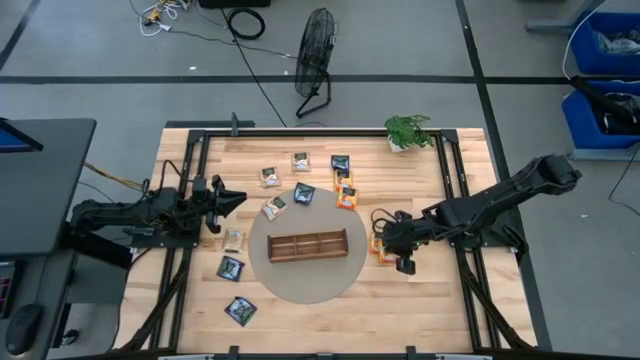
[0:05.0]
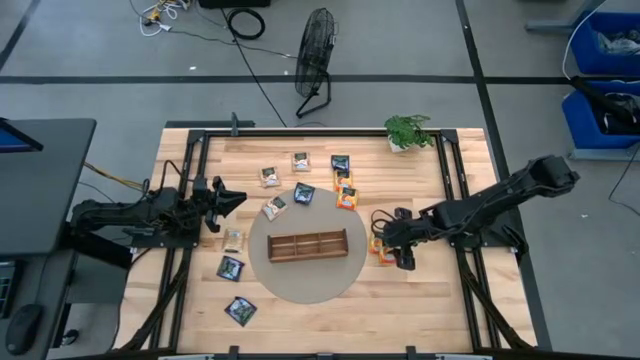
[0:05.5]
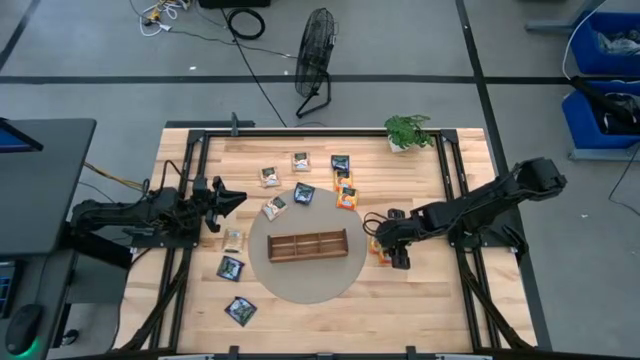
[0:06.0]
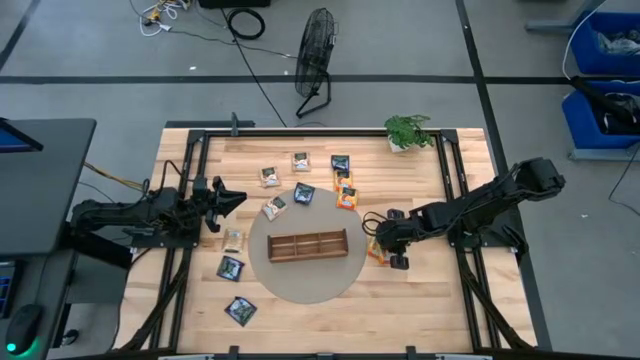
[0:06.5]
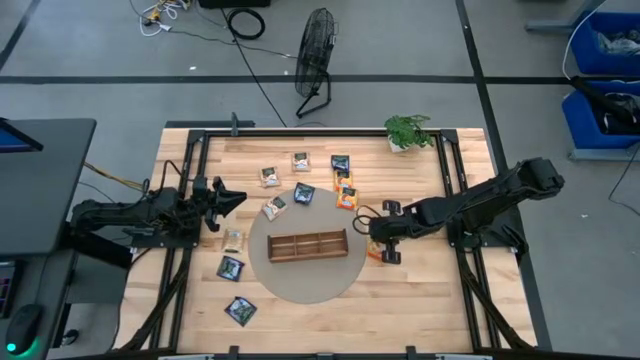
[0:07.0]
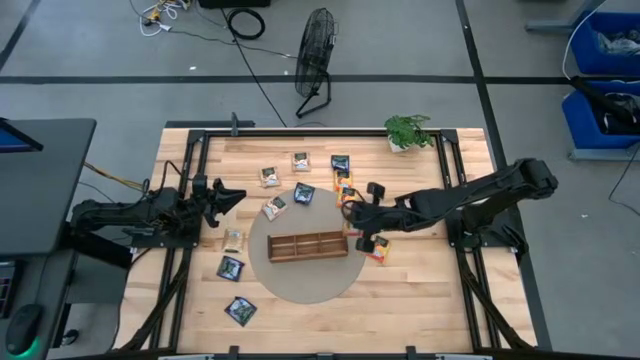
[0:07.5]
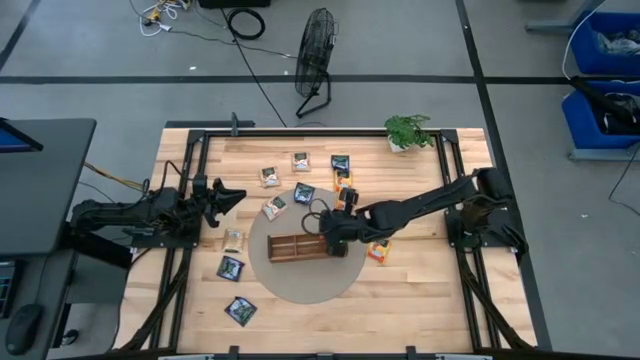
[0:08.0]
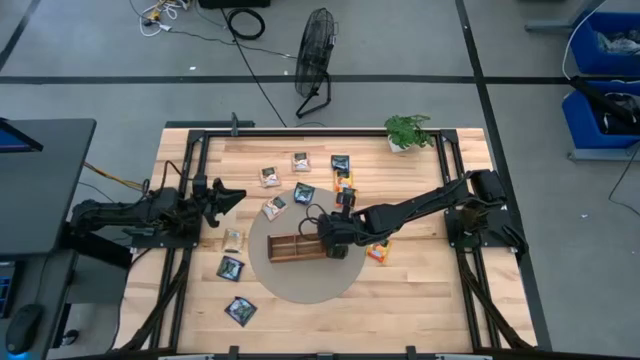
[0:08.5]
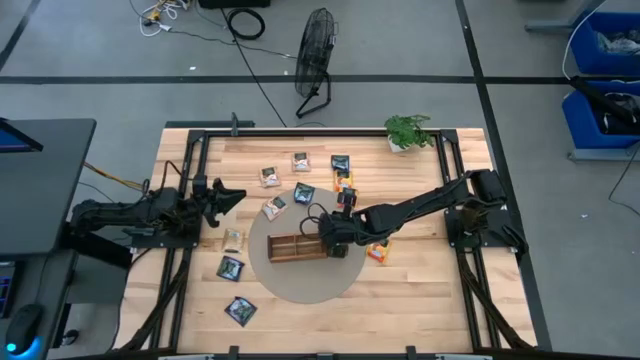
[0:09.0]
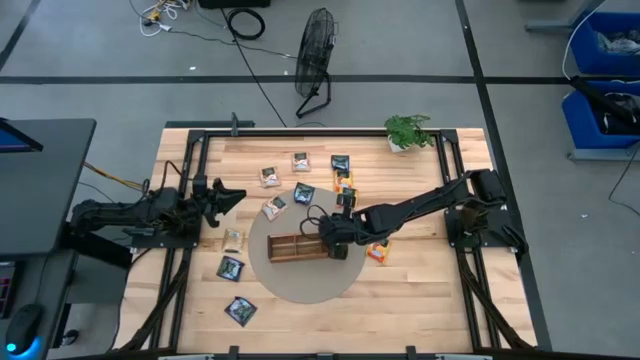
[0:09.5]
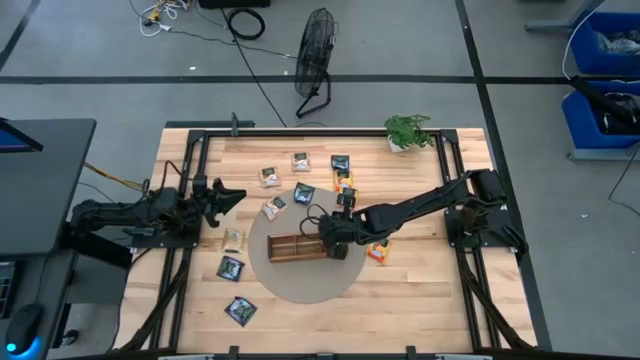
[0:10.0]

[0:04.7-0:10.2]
Task: Pick & Place Tea
Put the orange tea bag into the right section of the wooden organizer

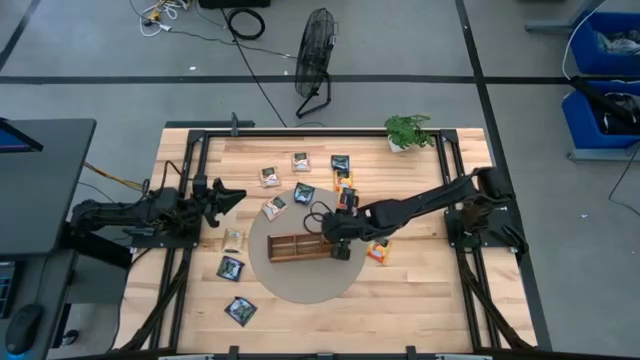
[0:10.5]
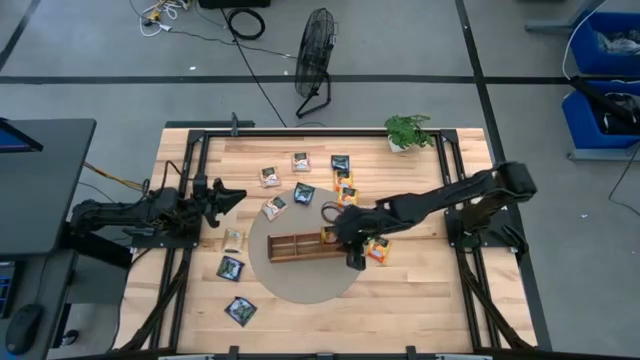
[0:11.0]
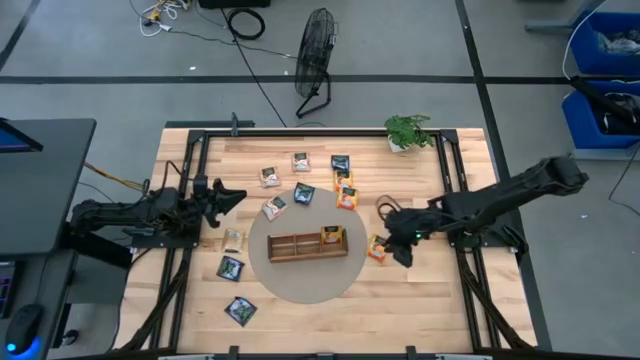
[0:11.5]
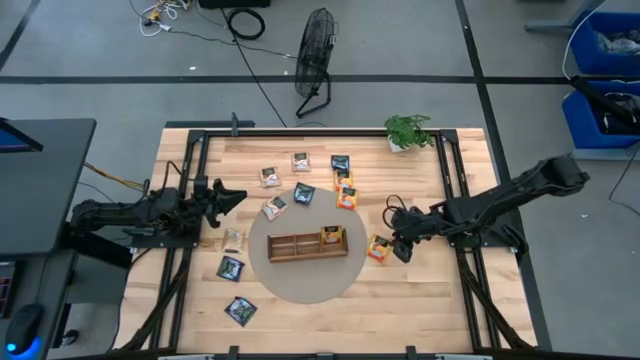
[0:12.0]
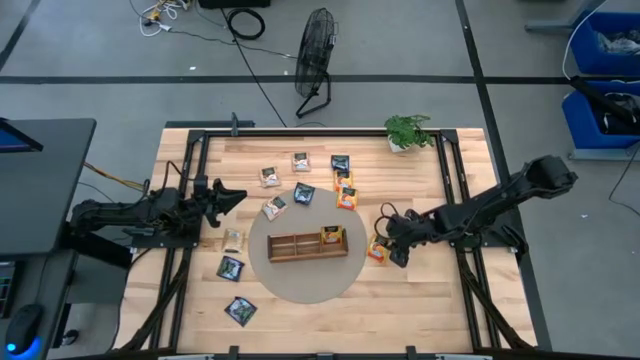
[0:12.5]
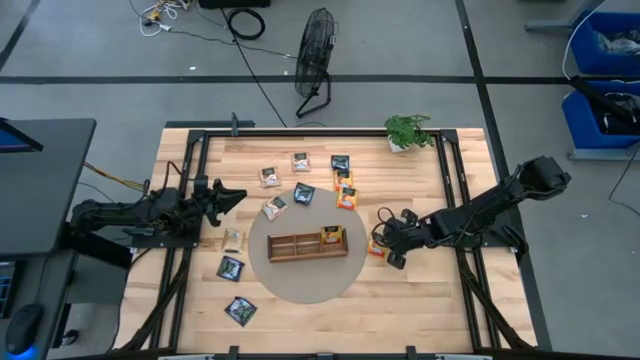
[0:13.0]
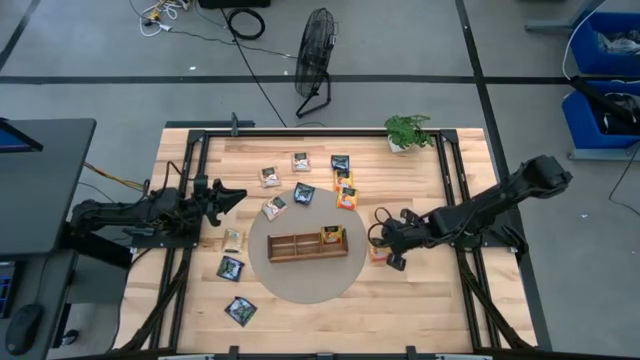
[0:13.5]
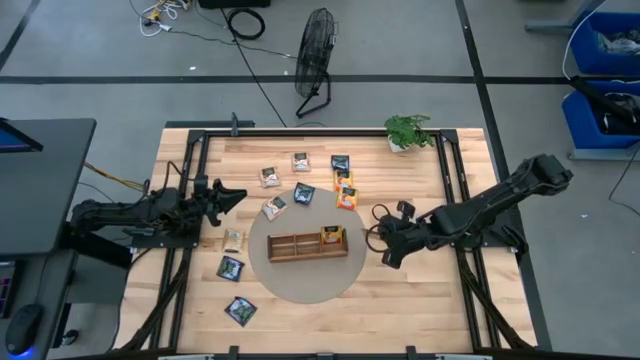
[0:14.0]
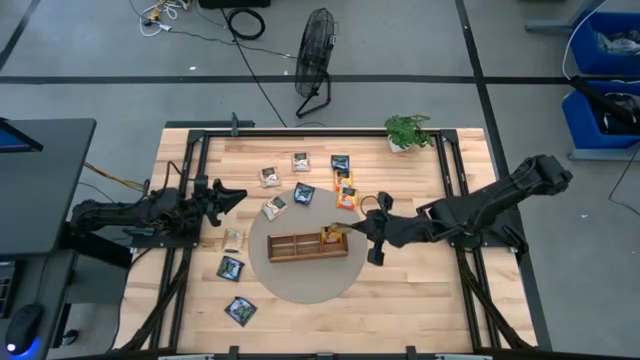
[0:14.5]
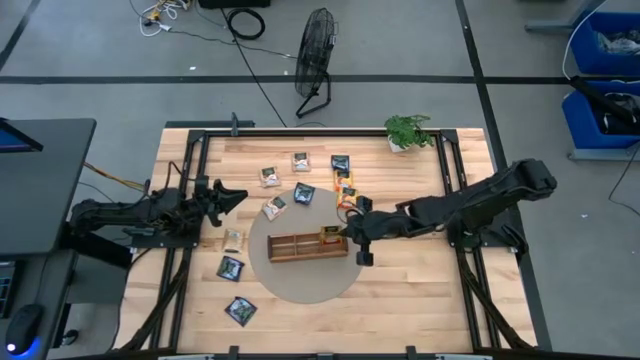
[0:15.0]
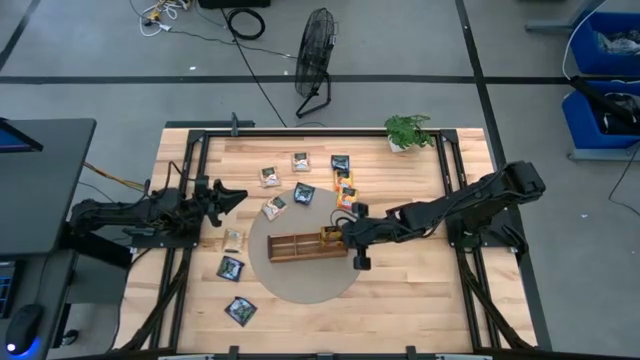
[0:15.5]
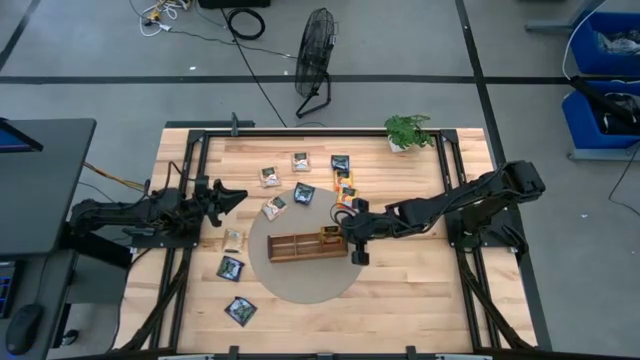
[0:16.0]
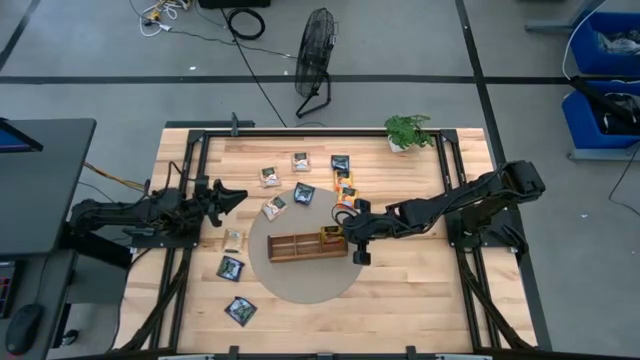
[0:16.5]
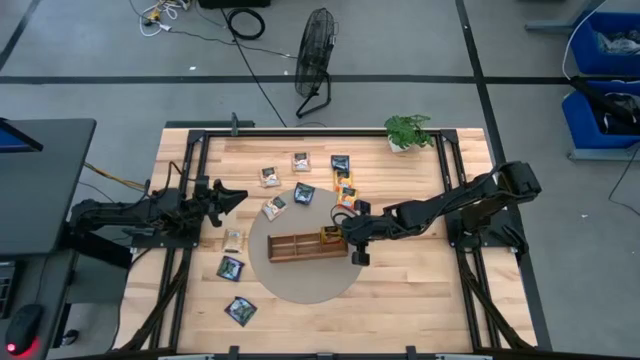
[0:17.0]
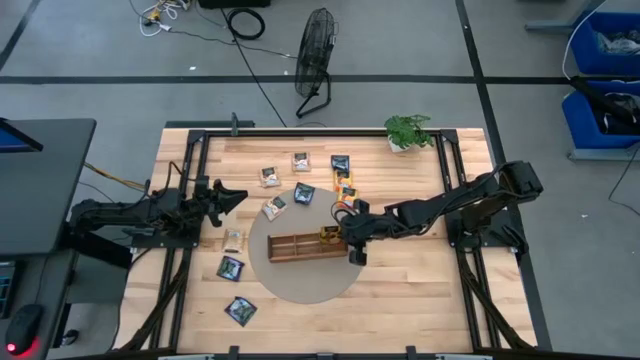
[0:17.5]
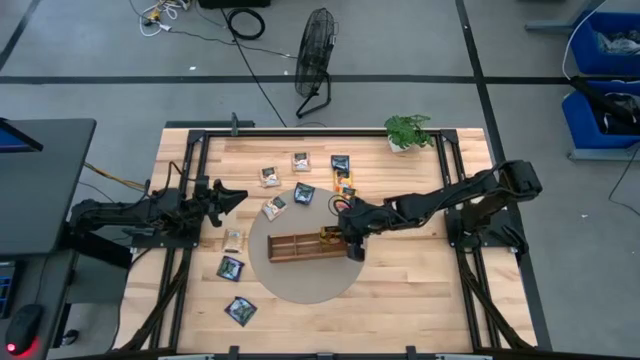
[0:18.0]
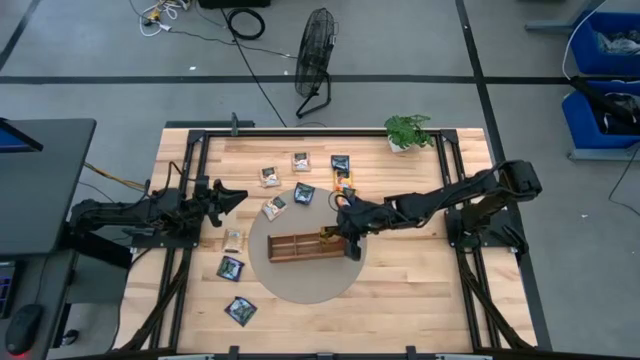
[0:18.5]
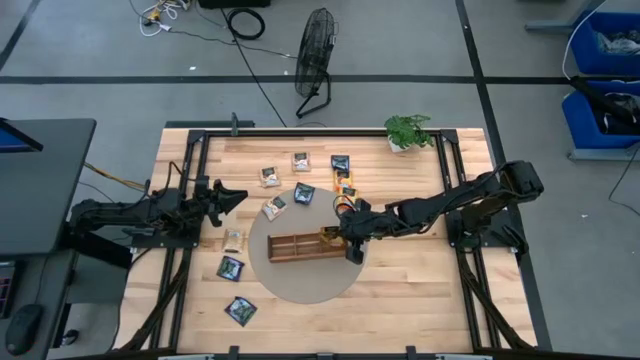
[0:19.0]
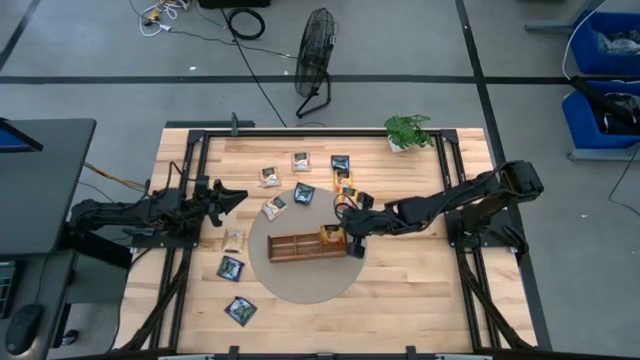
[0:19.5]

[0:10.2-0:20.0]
Put the orange tea bag into the right section of the wooden organizer

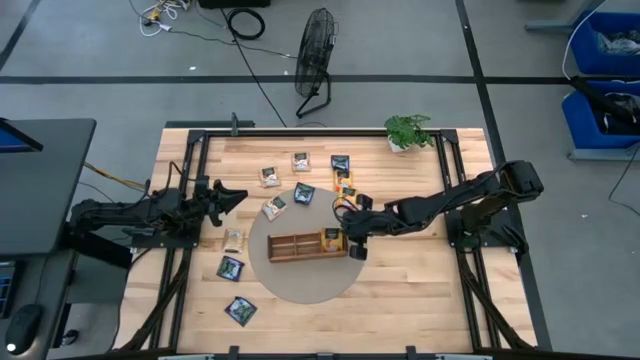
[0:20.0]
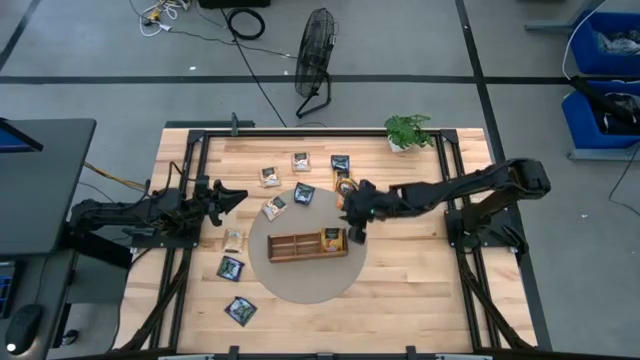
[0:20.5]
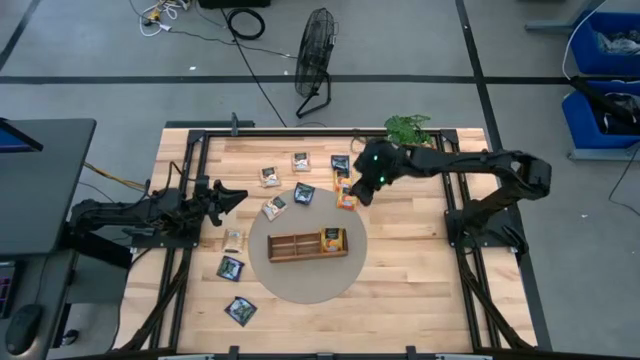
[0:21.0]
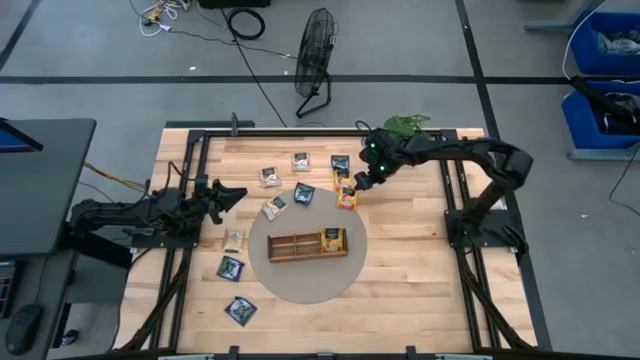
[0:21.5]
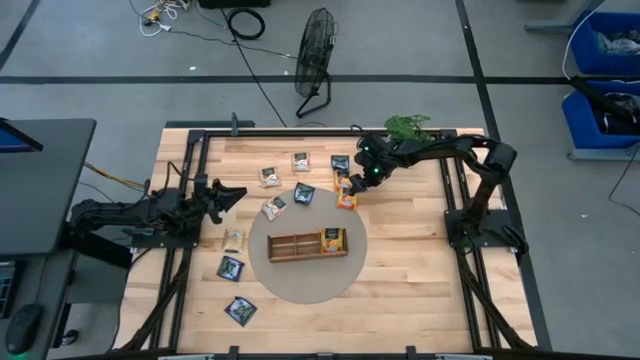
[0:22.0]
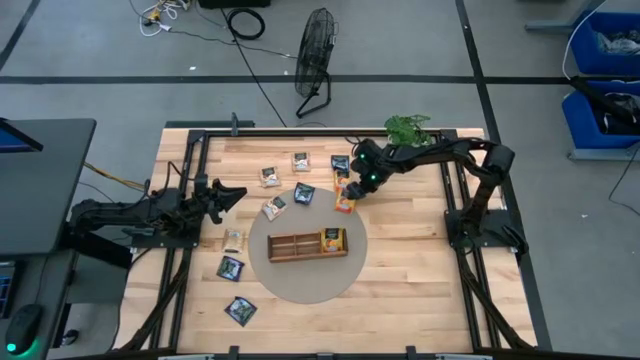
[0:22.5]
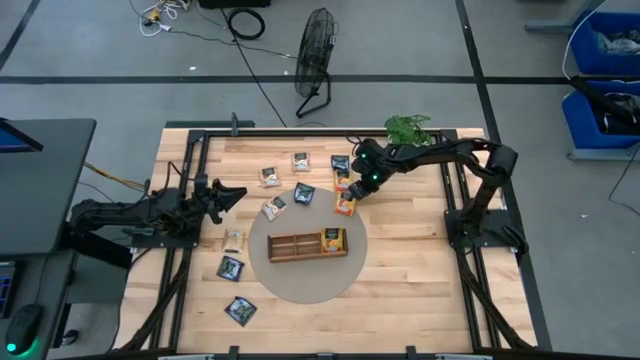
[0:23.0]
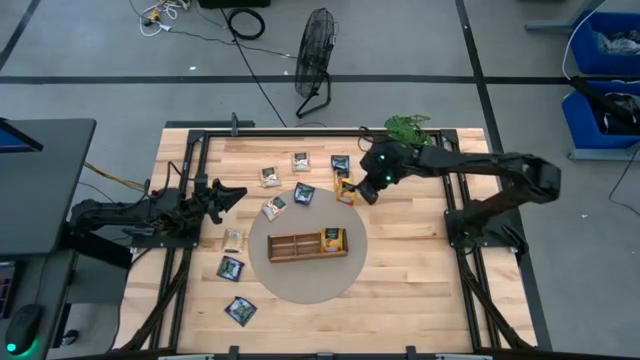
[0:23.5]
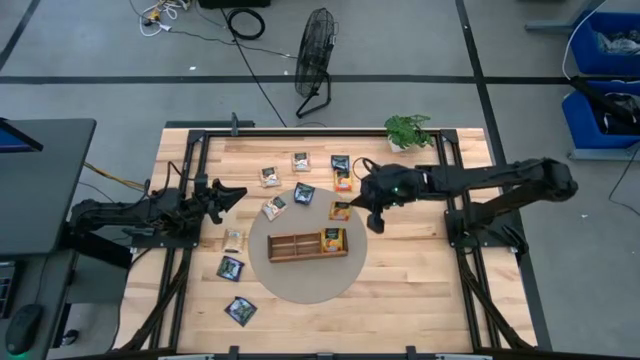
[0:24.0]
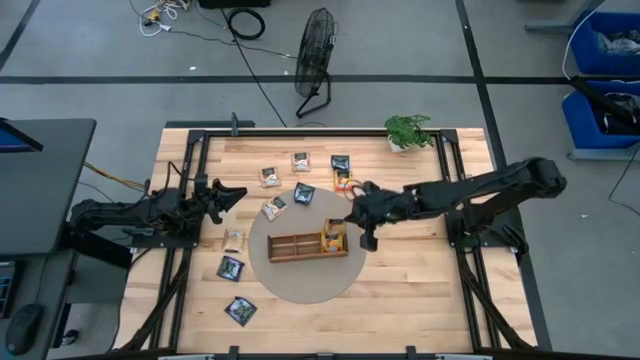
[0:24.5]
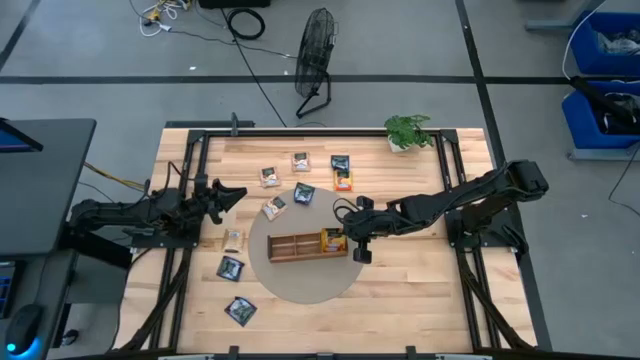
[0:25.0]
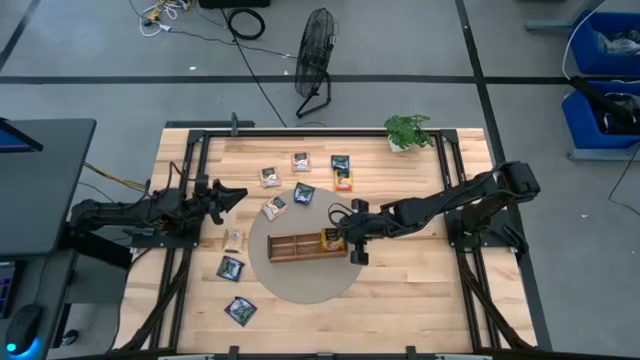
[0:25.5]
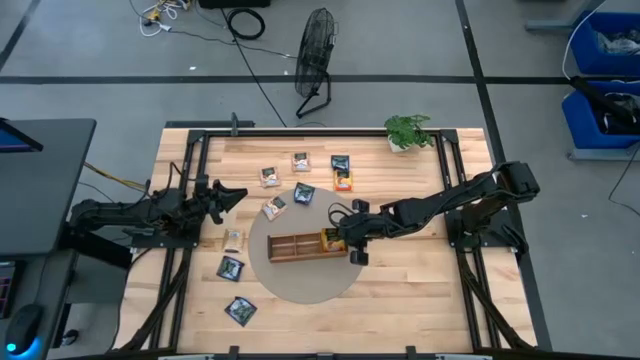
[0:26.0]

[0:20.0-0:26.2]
Put the orange tea bag into the right section of the wooden organizer
